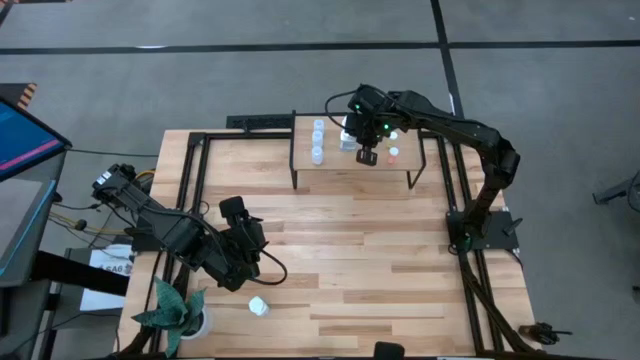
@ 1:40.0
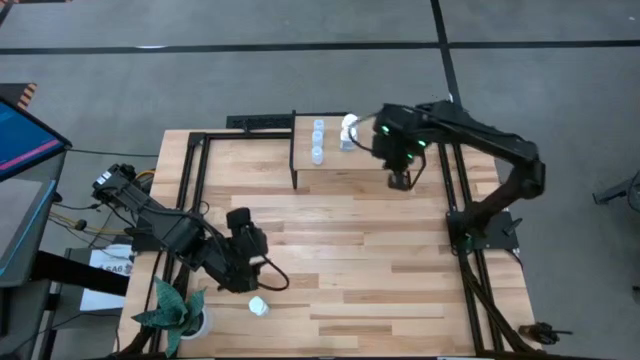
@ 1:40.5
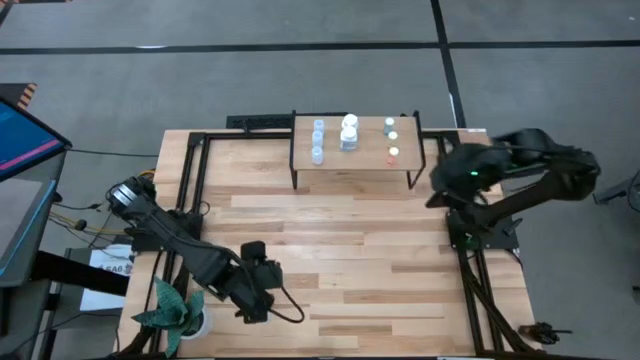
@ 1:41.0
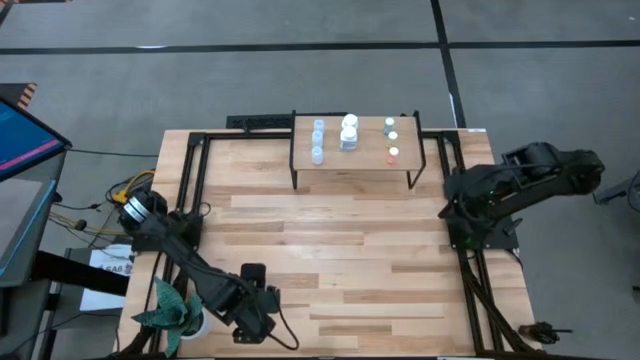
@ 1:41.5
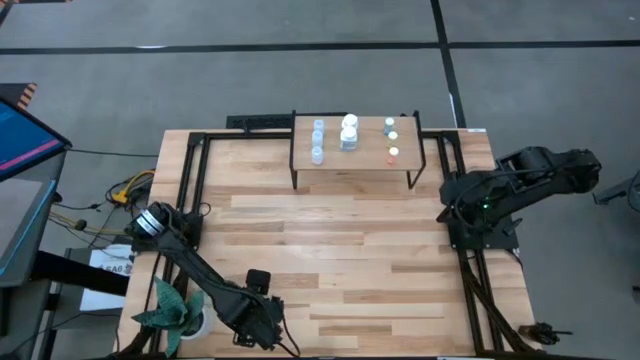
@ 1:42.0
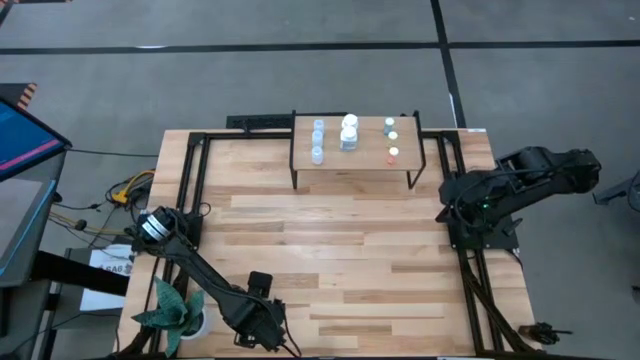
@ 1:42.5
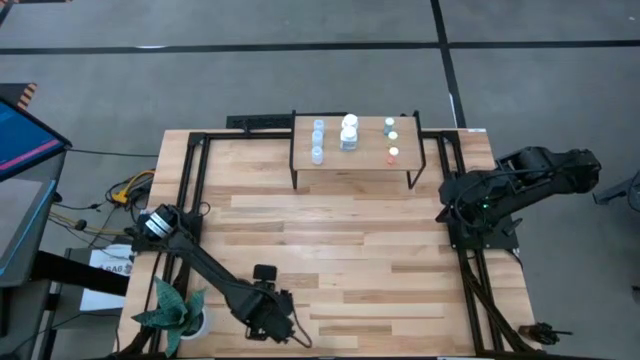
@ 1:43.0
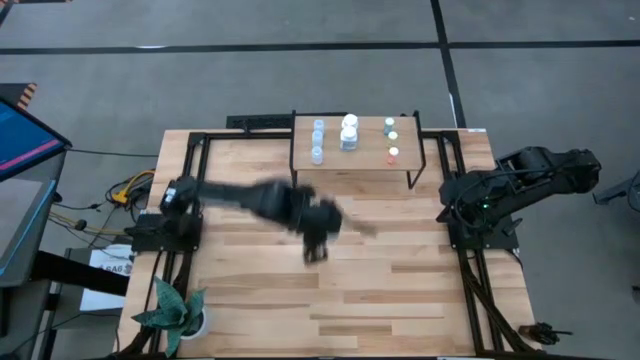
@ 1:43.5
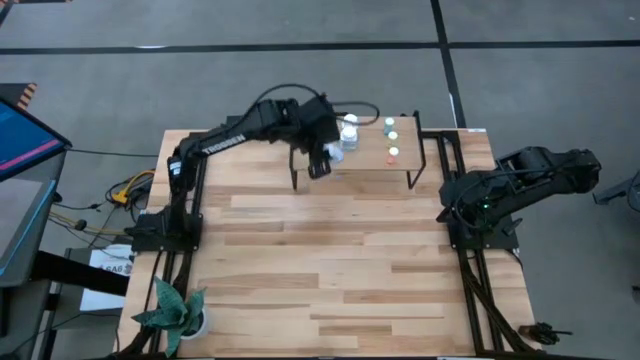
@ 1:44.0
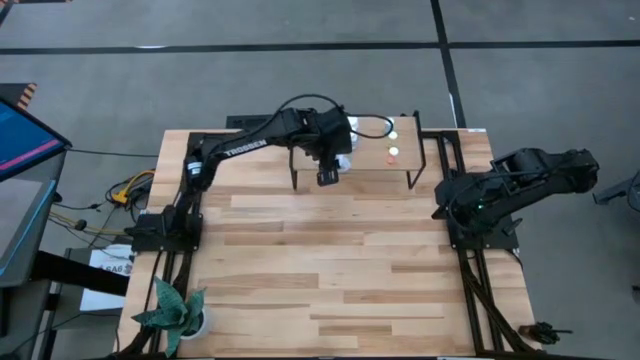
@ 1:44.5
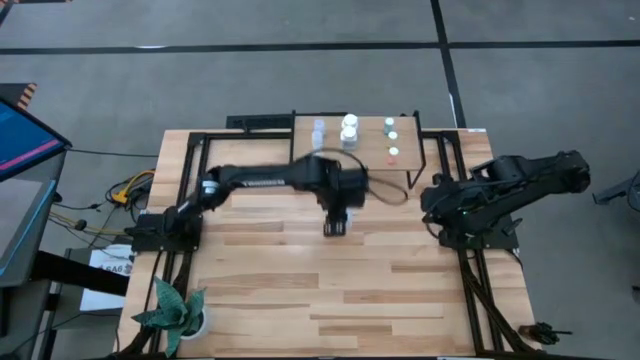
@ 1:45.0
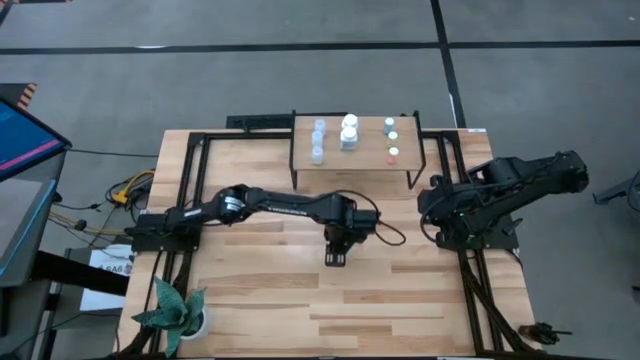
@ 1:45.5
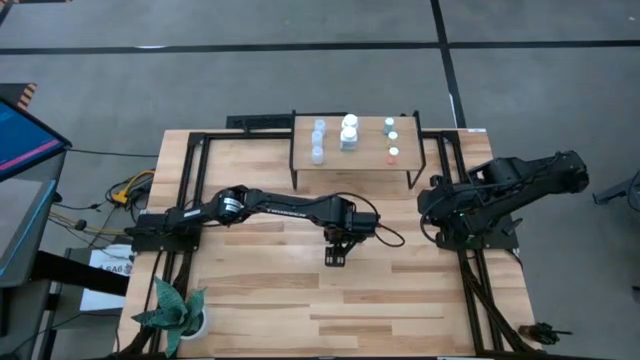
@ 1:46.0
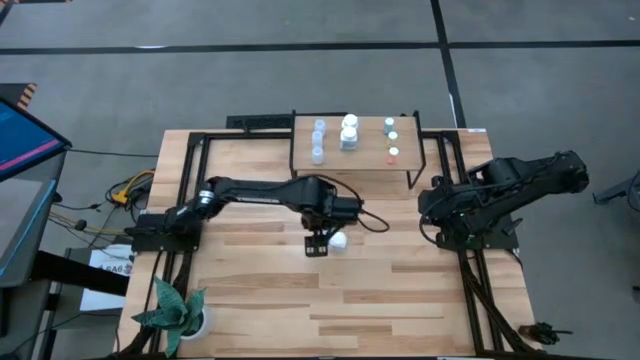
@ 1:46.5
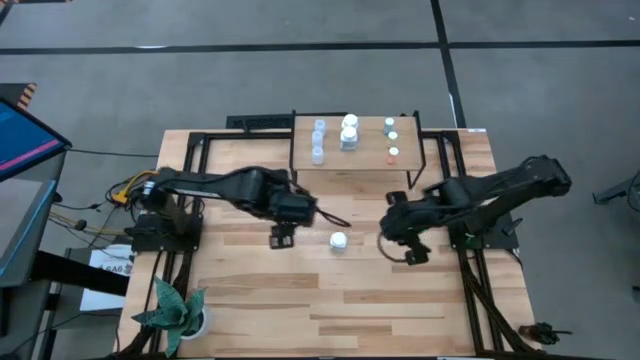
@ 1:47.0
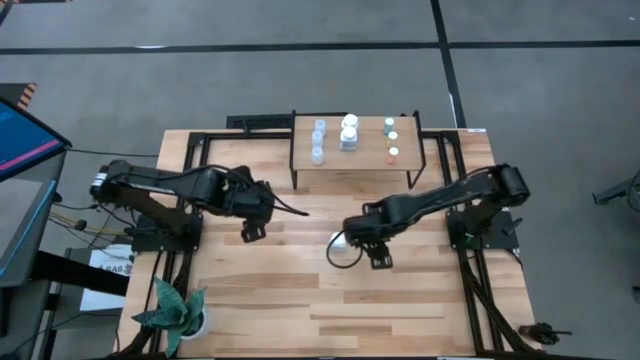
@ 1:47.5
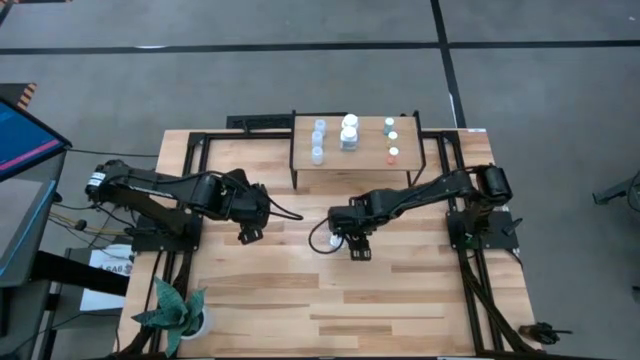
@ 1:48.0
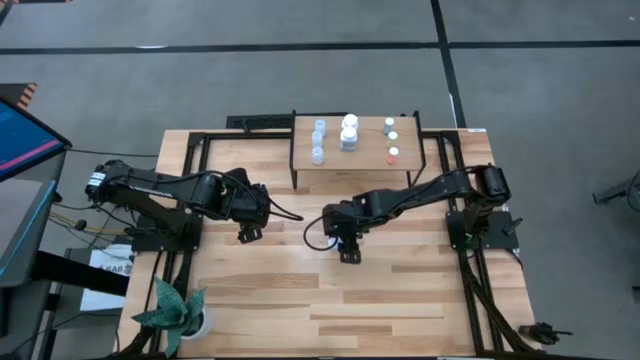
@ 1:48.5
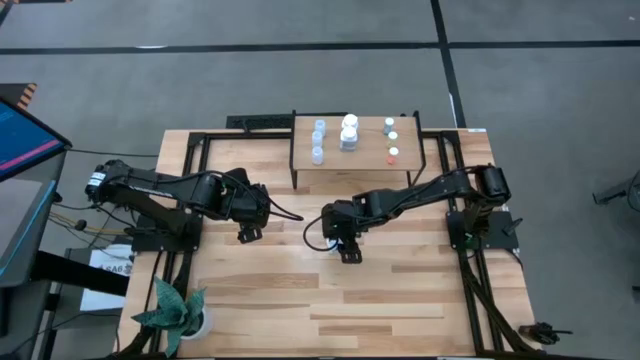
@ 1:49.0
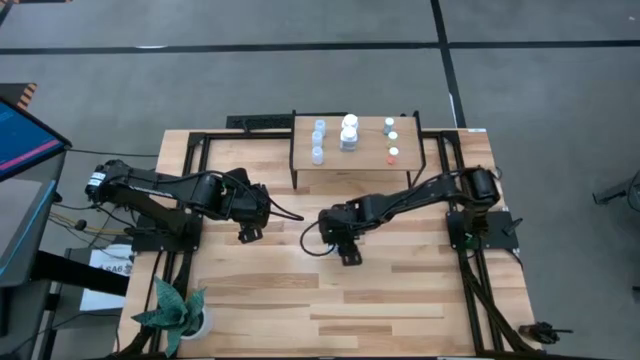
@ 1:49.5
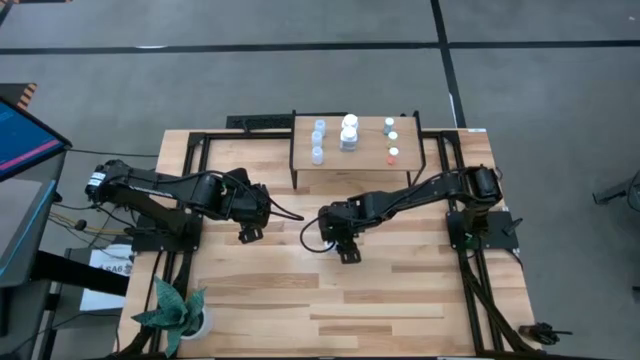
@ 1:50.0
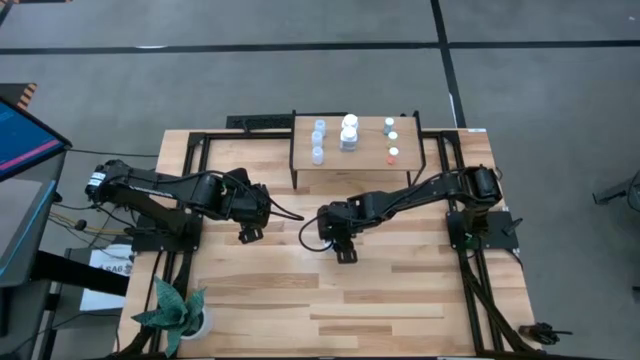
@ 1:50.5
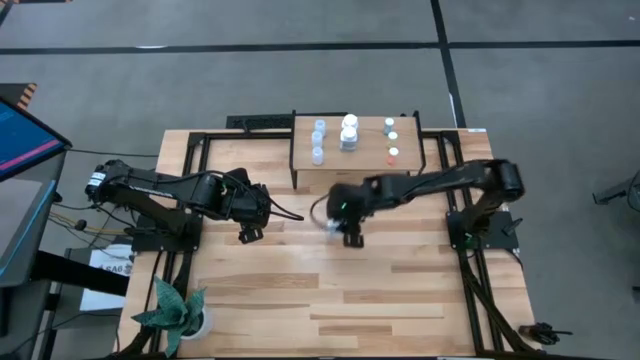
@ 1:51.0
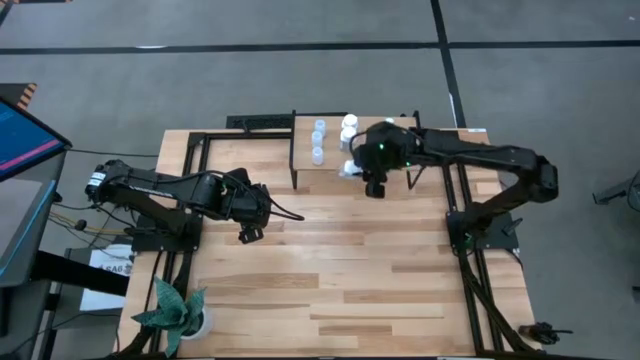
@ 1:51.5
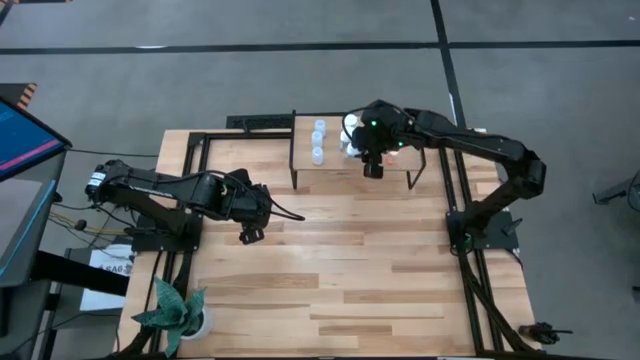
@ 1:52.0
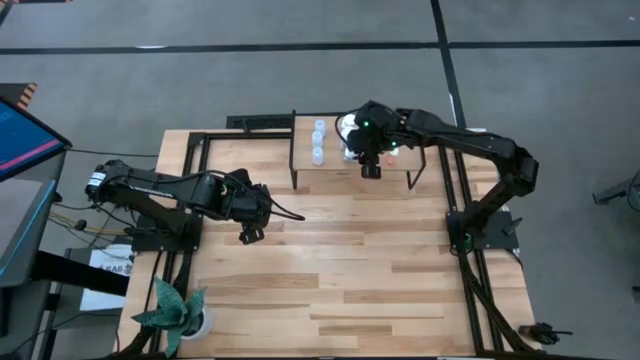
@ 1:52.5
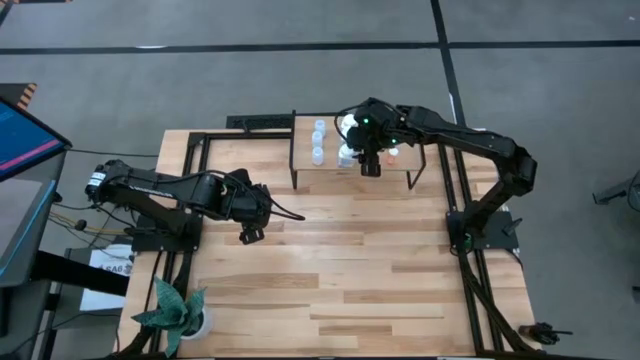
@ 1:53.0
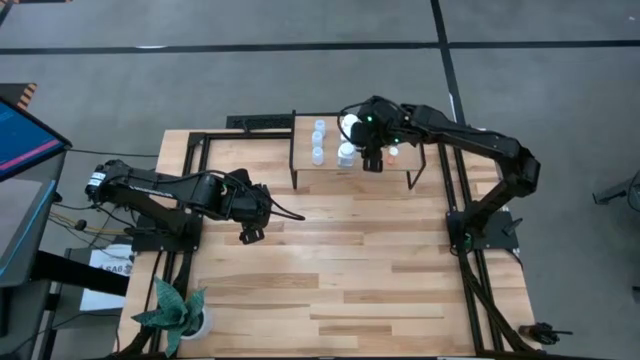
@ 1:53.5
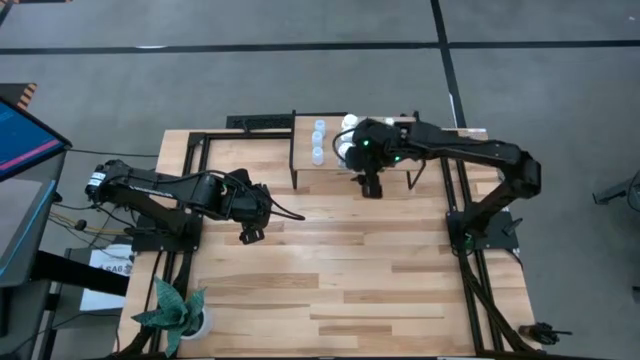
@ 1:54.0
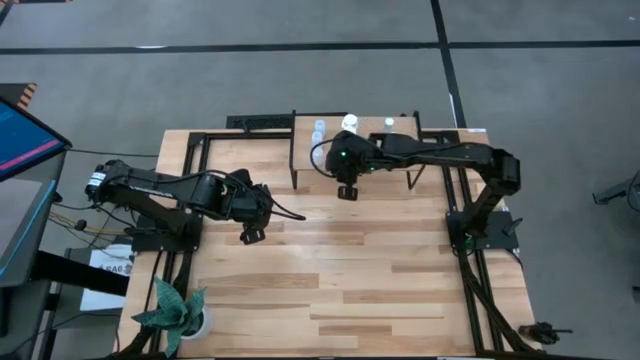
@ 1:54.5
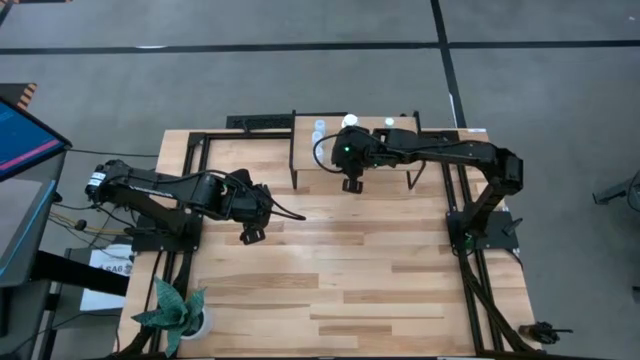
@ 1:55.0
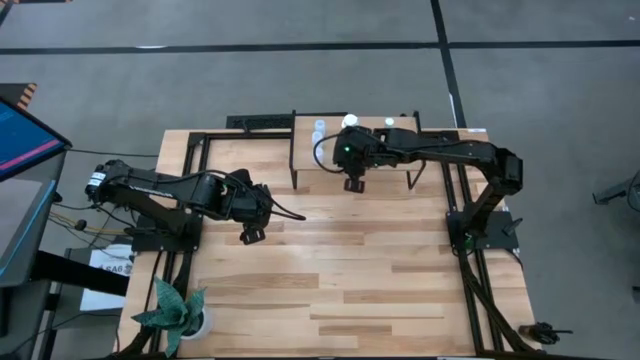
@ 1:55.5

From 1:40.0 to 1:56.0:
Task: Pick and place medicine bottles onto shelf by color
Put the white big pill bottle on the shelf

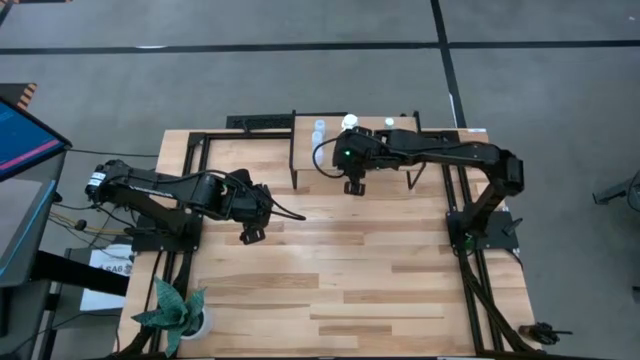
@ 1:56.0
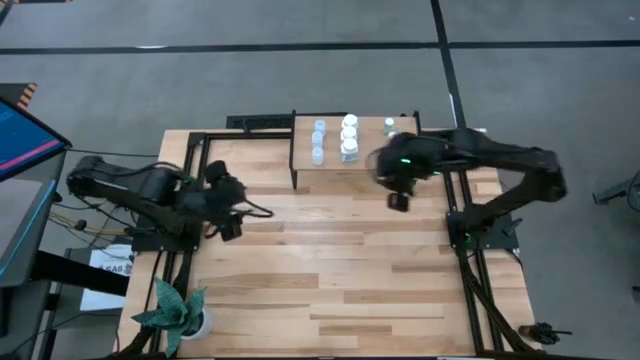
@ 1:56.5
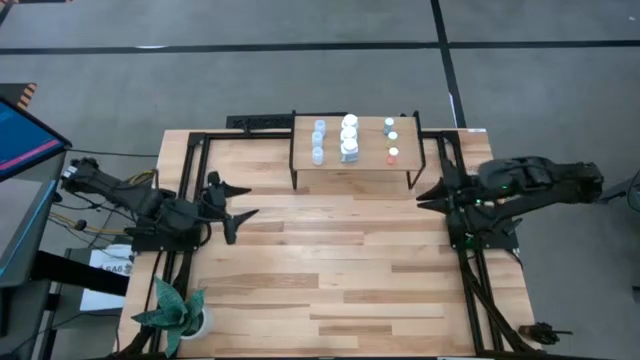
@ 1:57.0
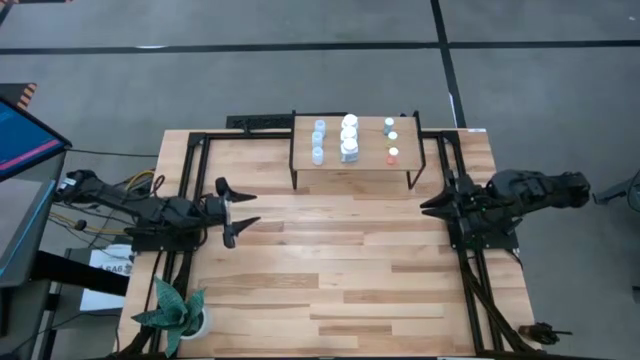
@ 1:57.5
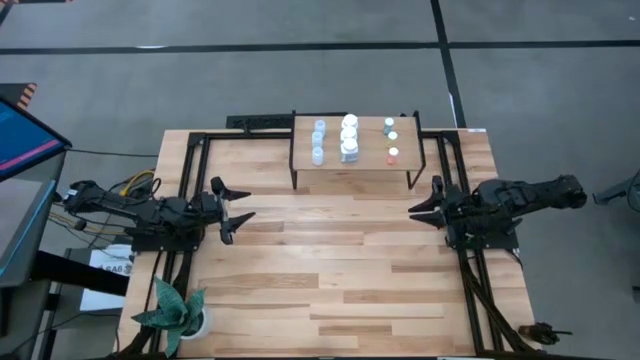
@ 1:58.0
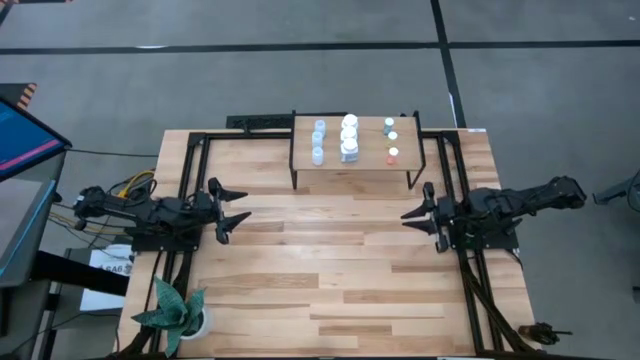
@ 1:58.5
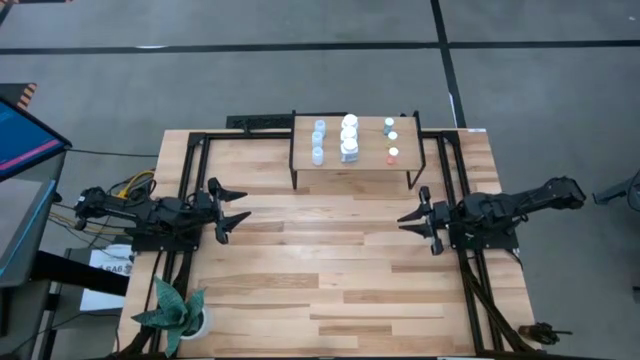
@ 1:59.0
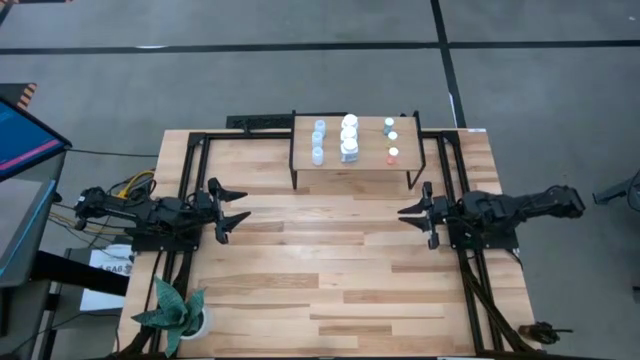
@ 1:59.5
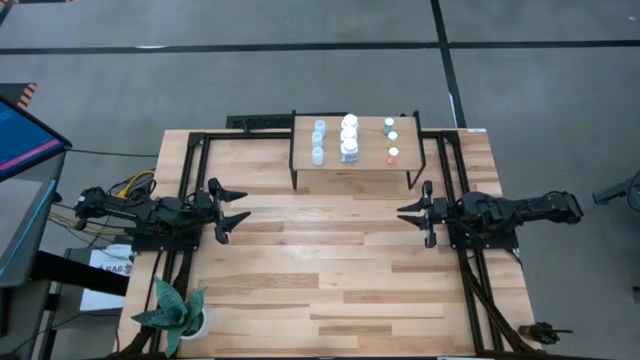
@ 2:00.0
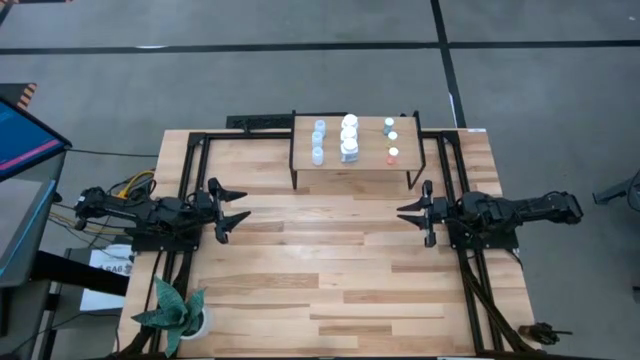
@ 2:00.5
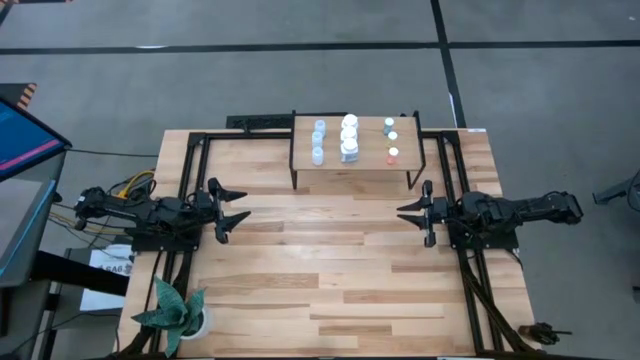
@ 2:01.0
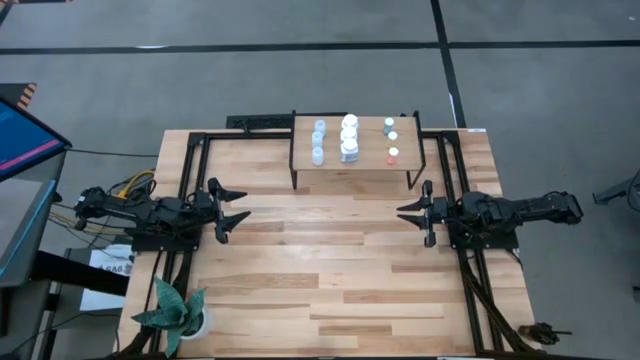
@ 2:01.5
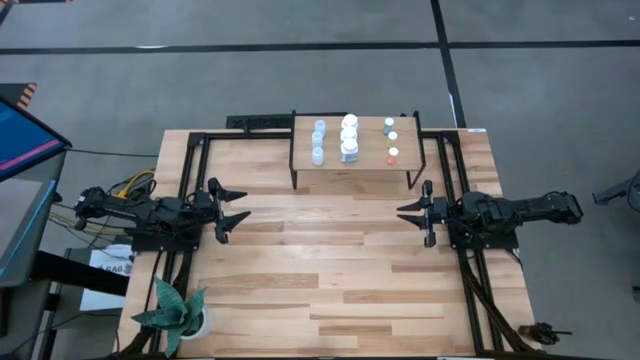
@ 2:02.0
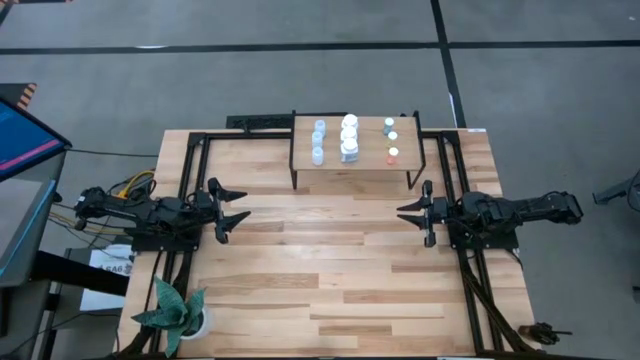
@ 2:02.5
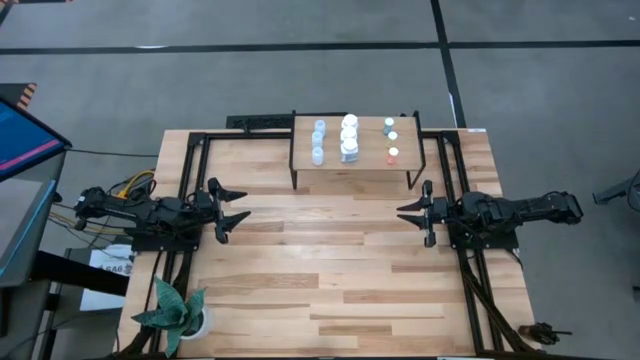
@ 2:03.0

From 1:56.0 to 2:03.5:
Return to Home Position
